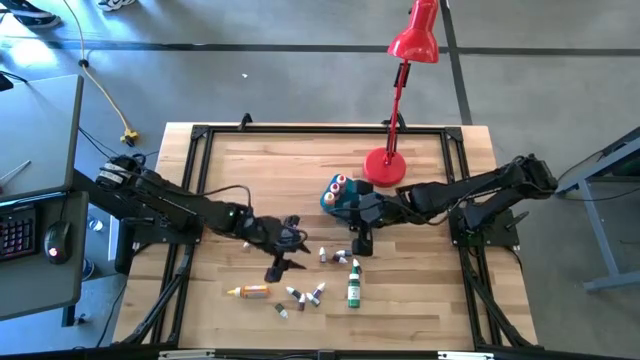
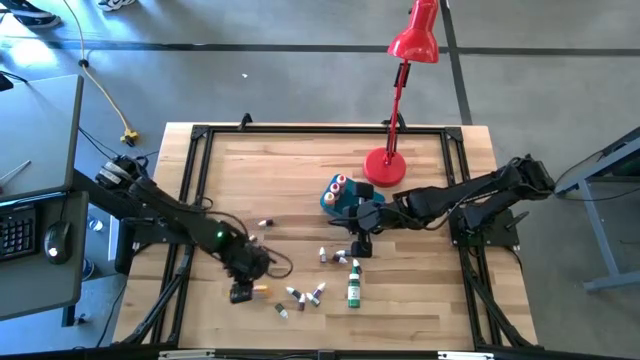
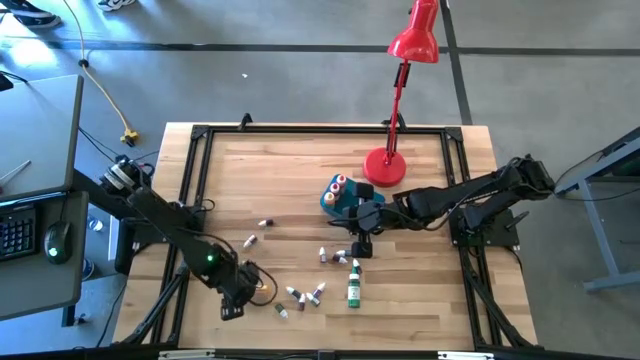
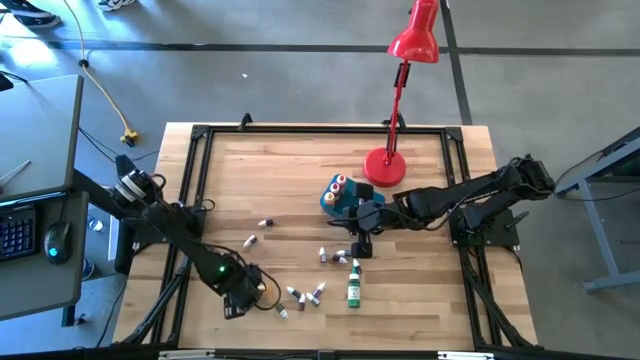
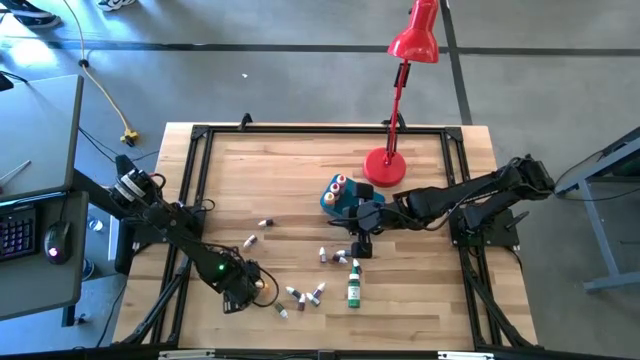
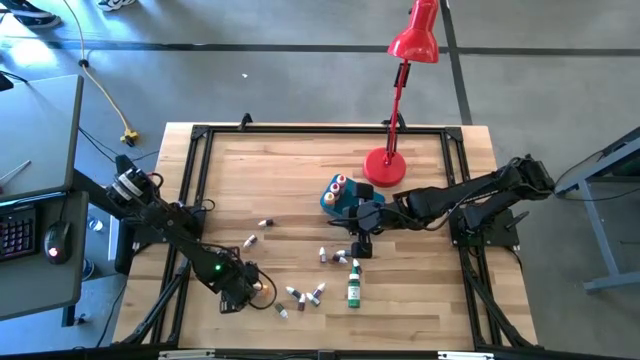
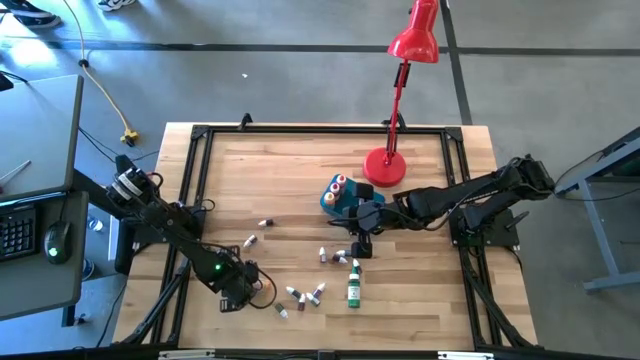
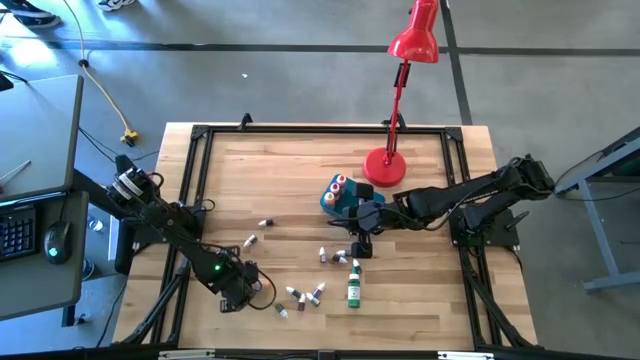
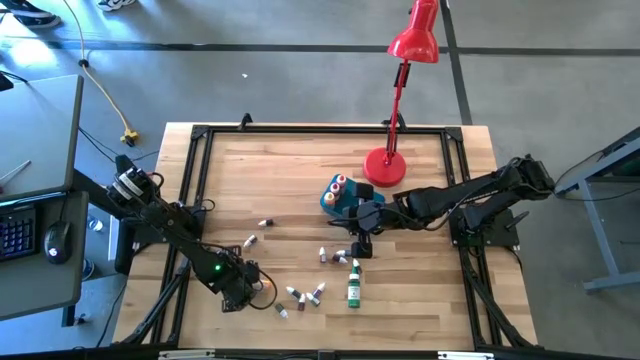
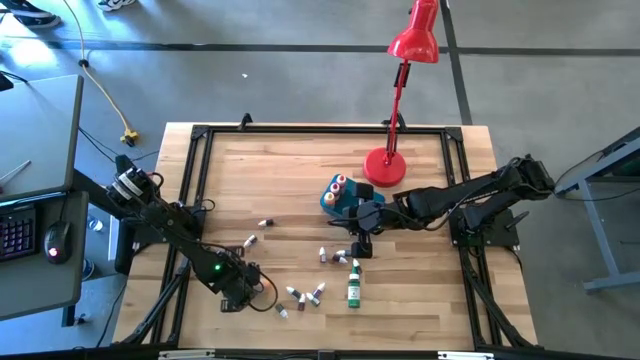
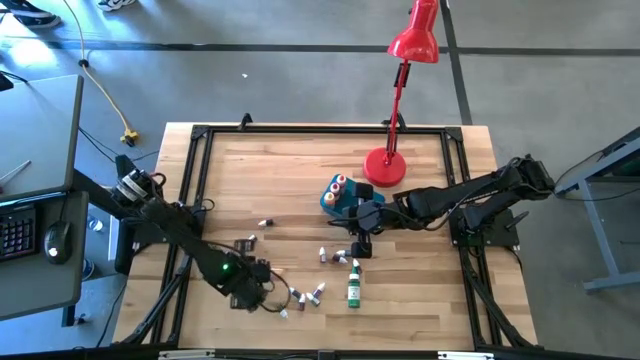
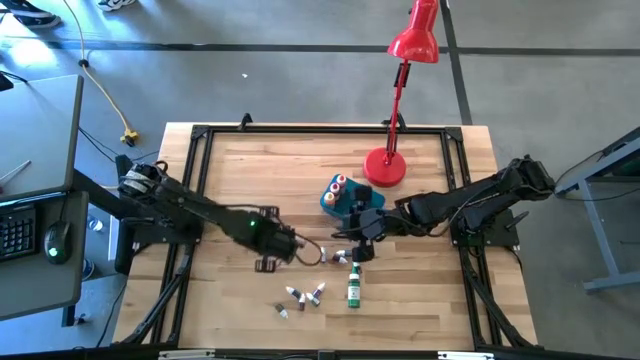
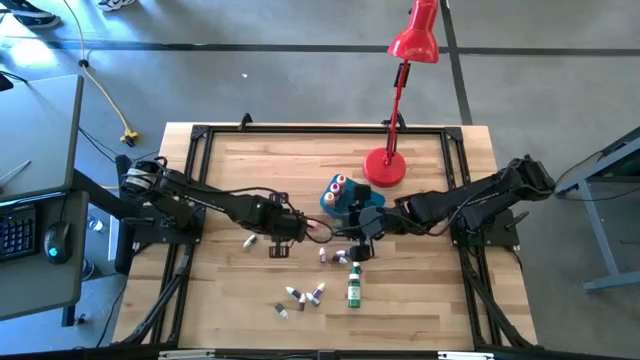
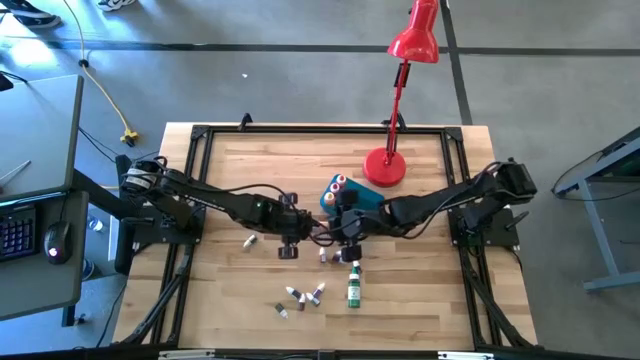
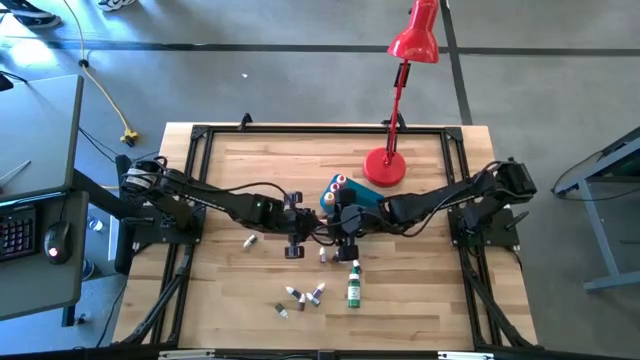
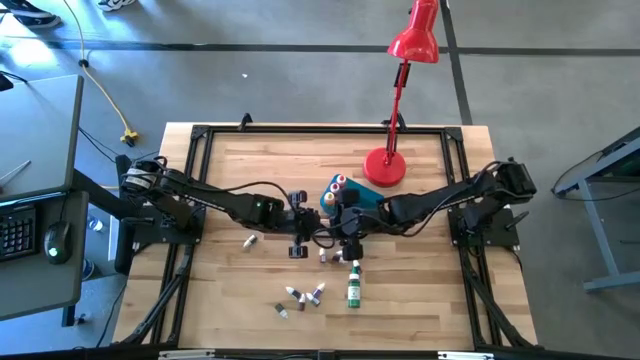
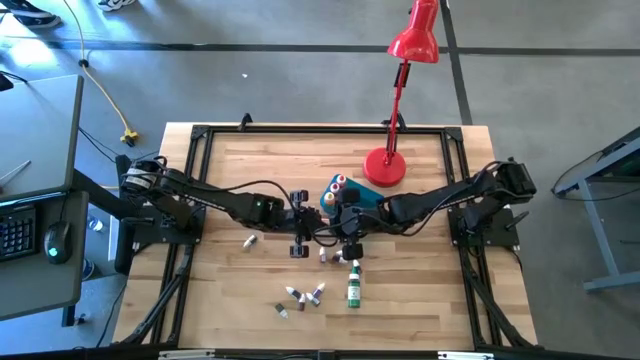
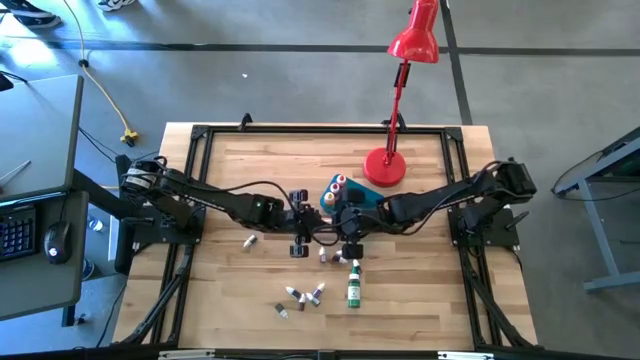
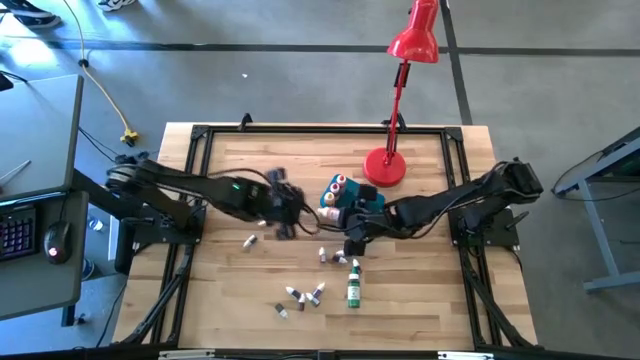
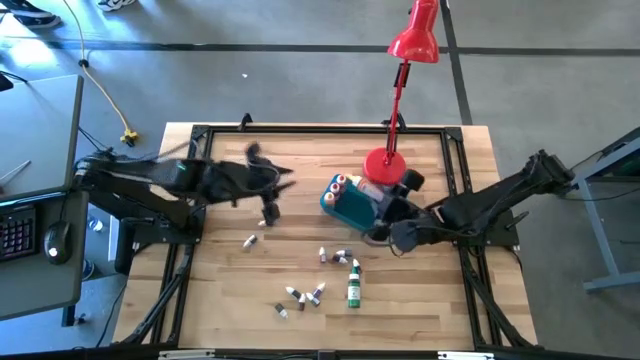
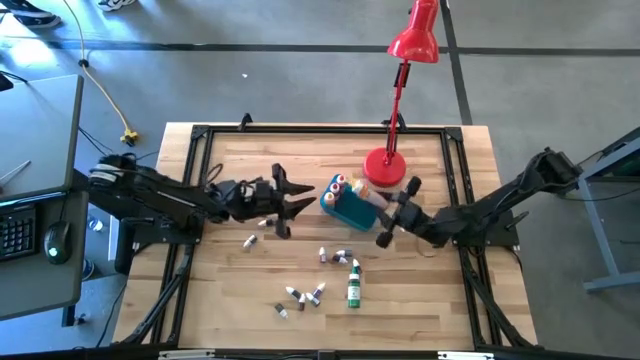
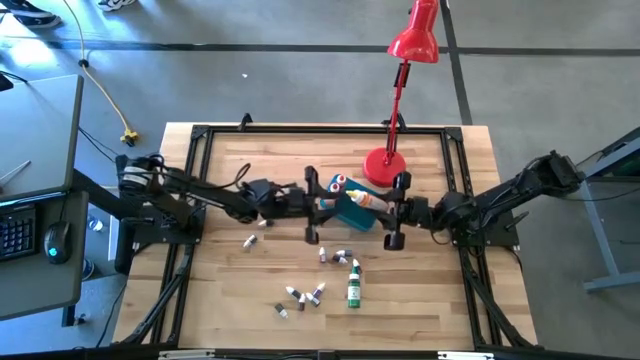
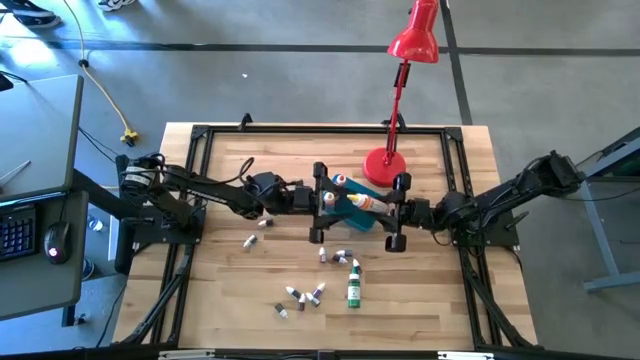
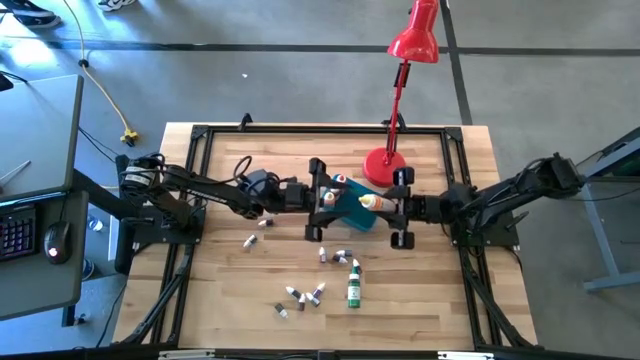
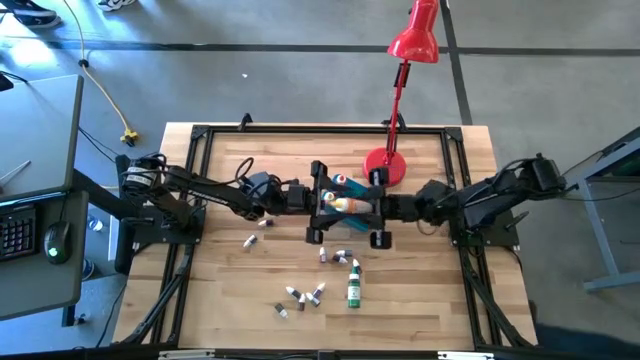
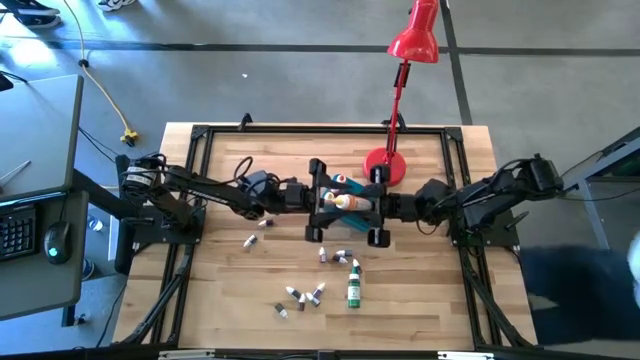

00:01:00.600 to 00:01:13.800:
Task: Pick & Place food coloring
Put the big yellow food coloring bottle into the blue container

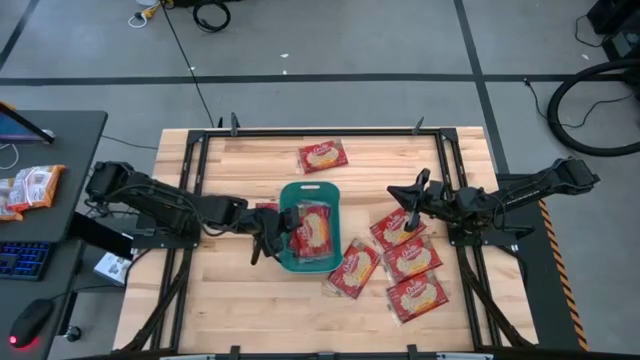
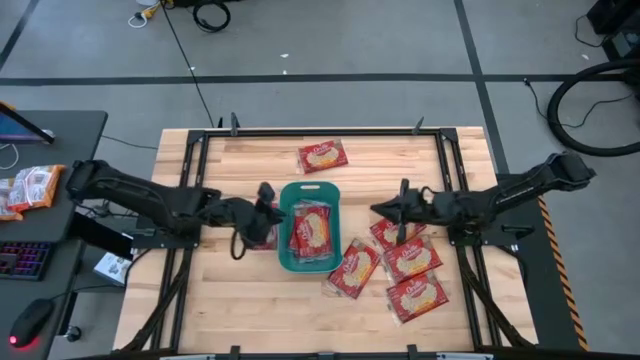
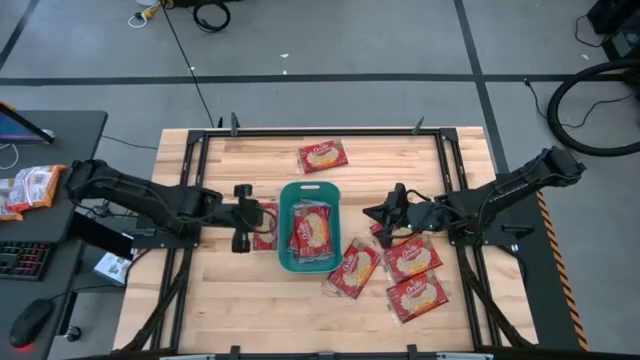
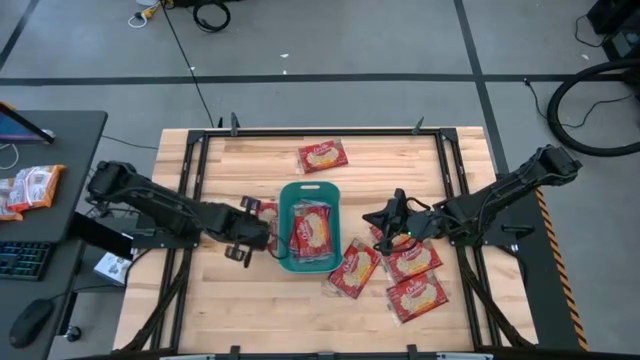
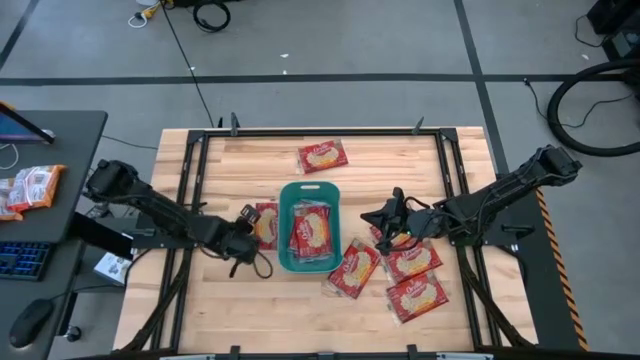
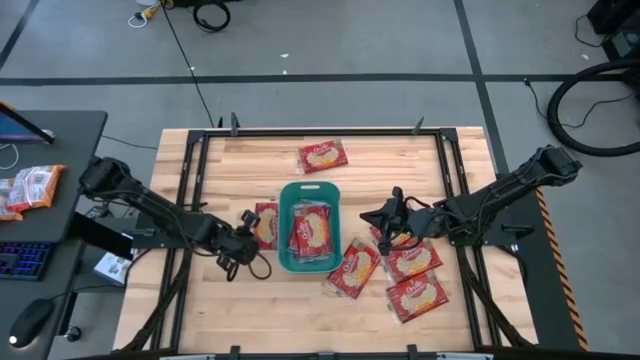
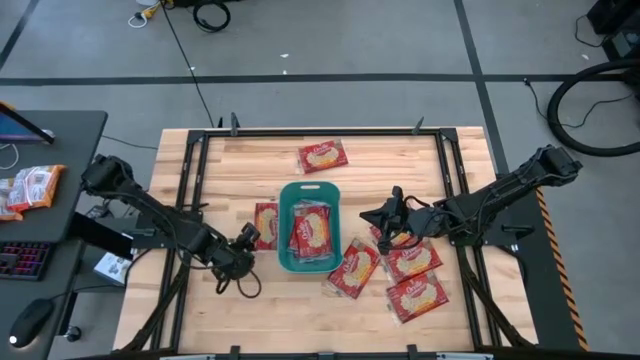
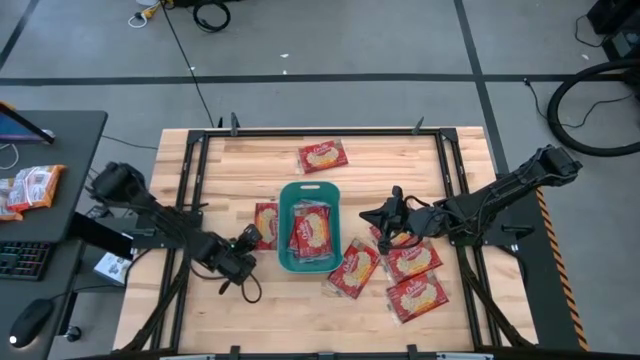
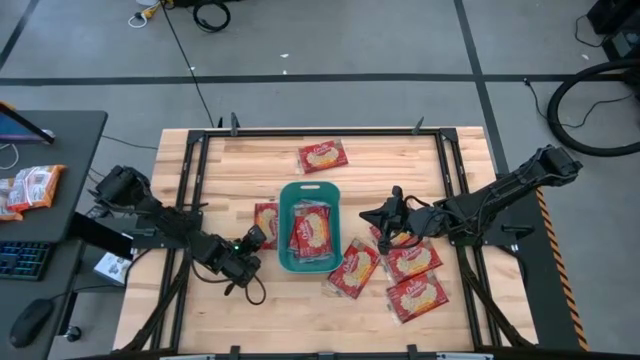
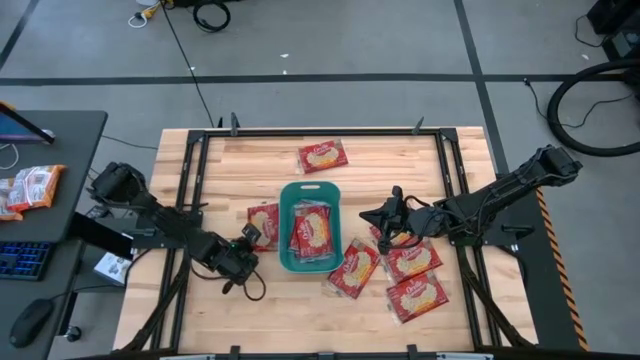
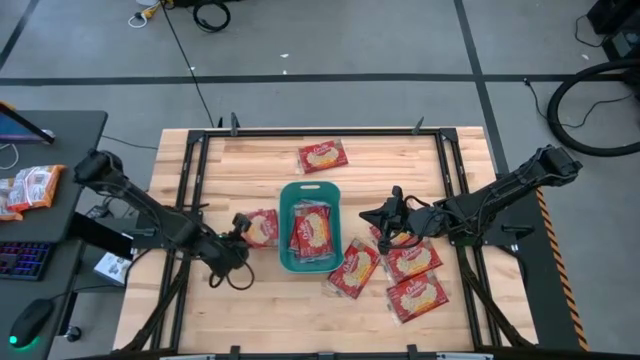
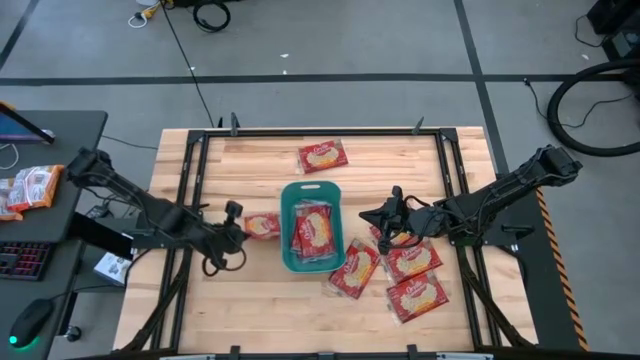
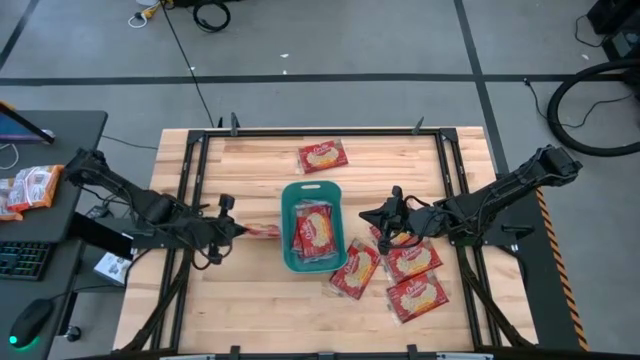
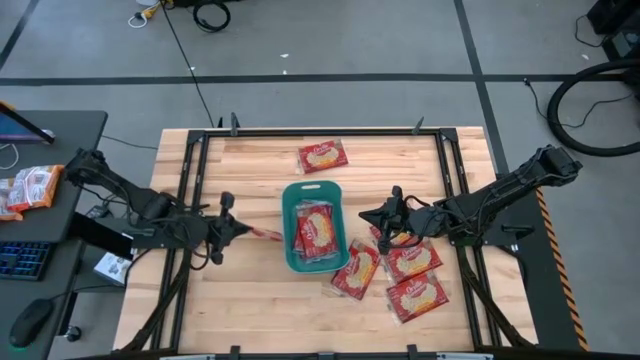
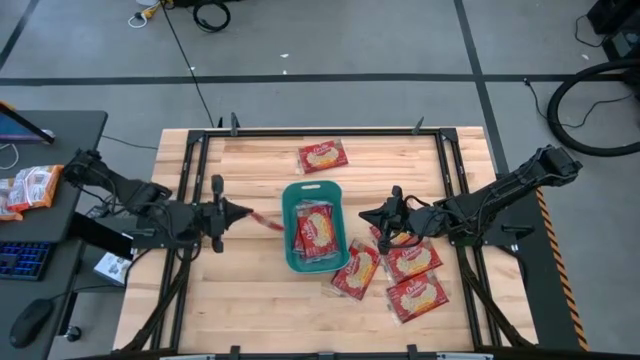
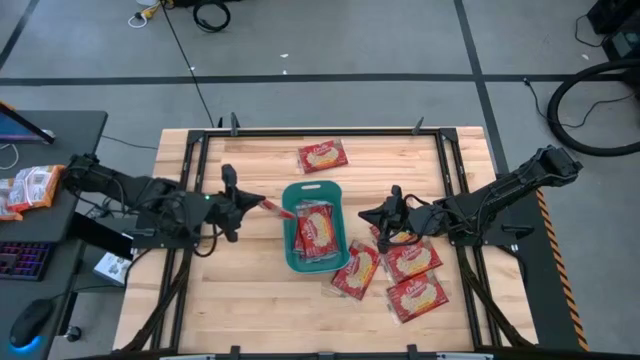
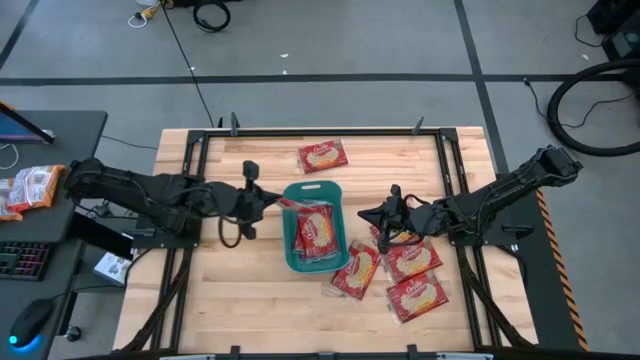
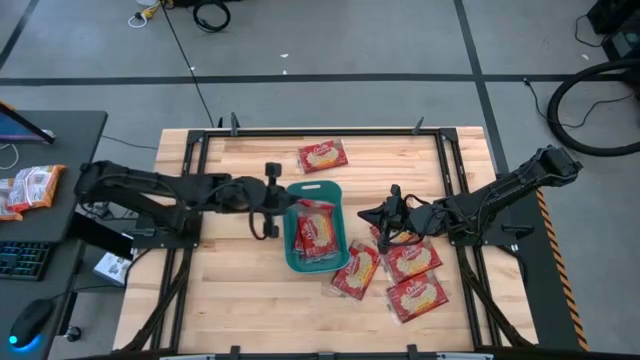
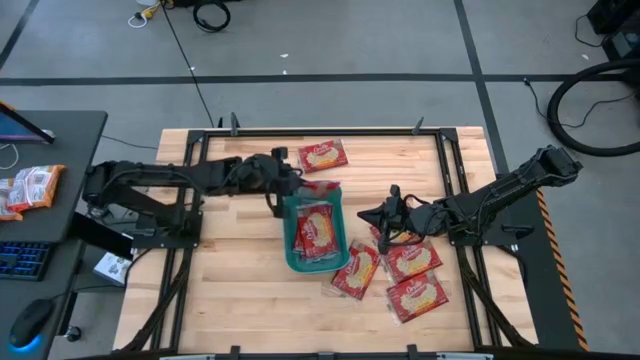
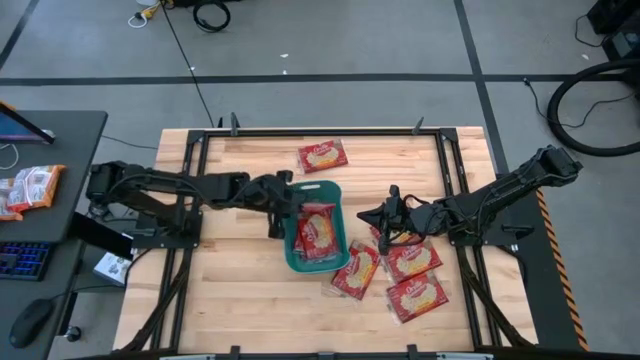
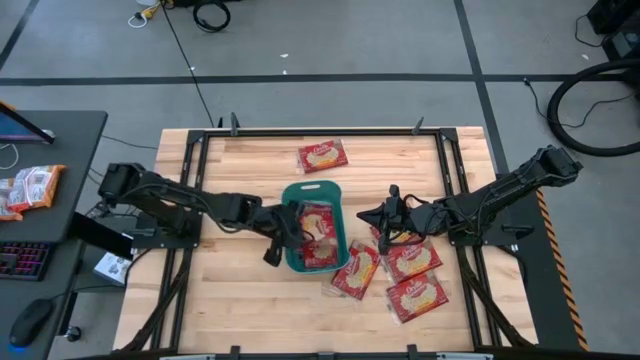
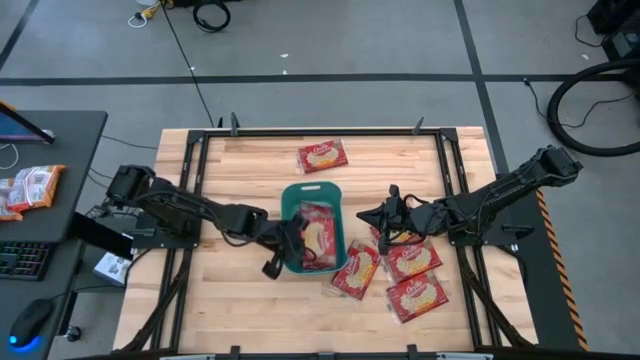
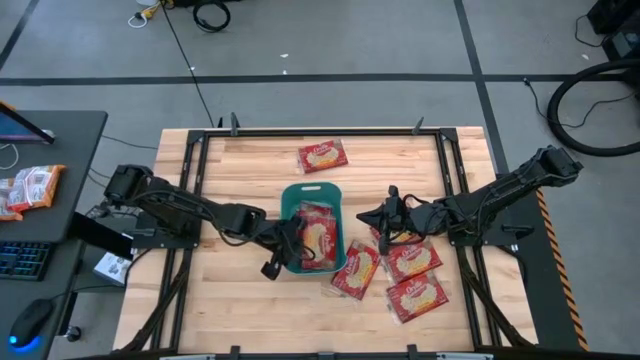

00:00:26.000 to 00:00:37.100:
Task: Sort popcorn bags into baskets
Put the red popcorn bag into the green bin
